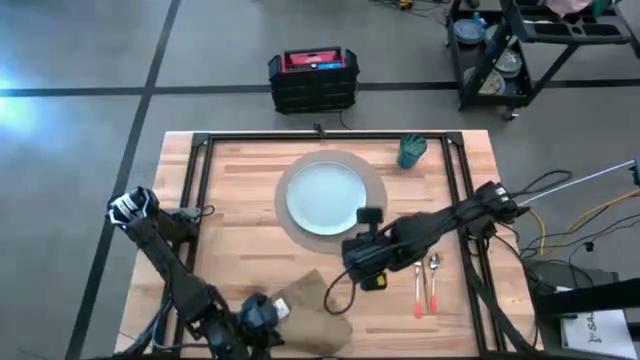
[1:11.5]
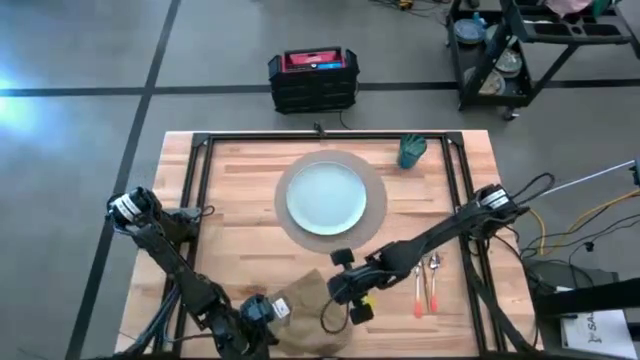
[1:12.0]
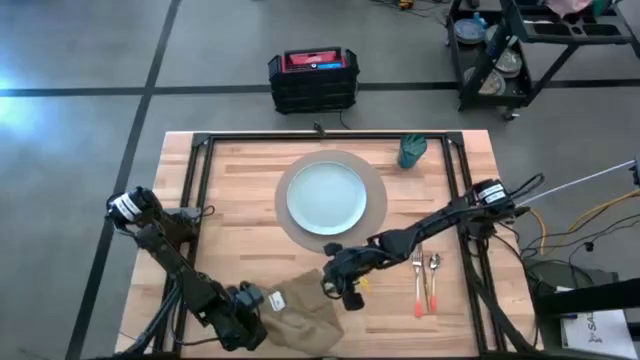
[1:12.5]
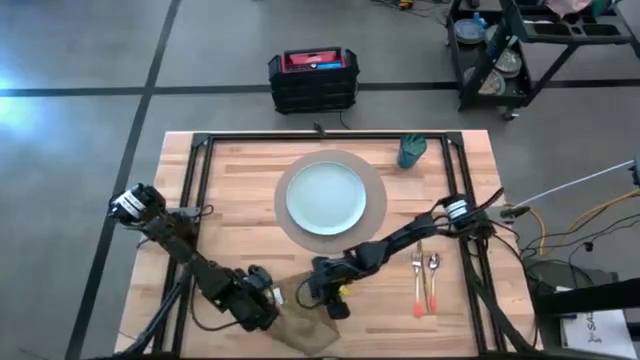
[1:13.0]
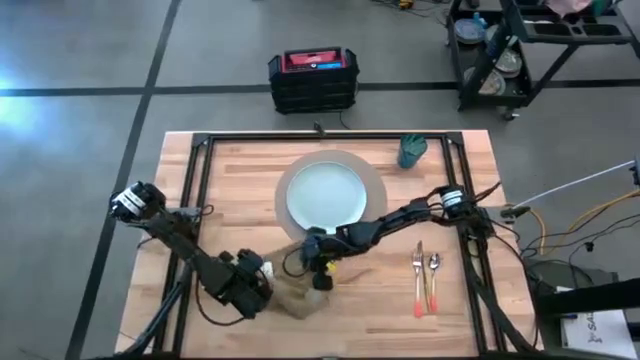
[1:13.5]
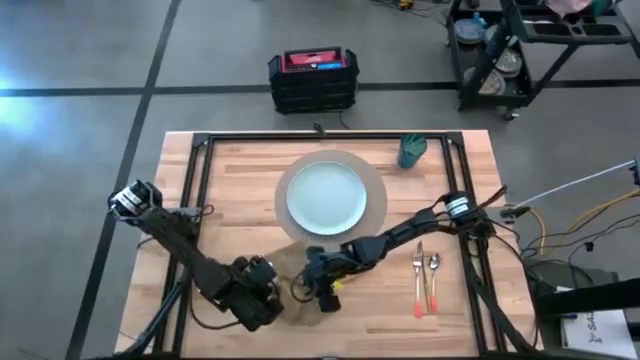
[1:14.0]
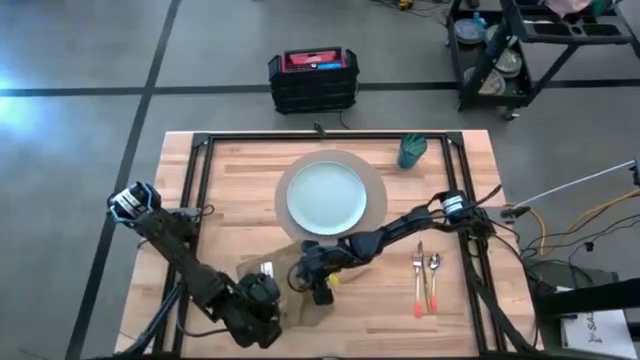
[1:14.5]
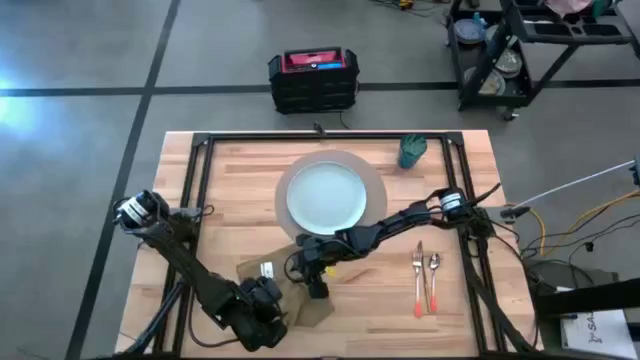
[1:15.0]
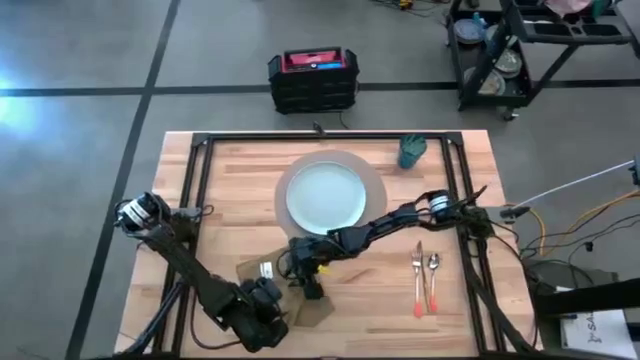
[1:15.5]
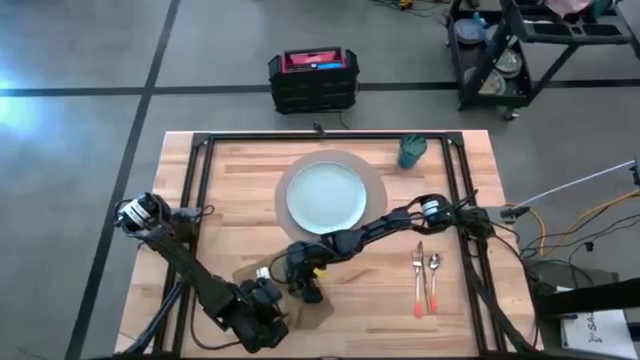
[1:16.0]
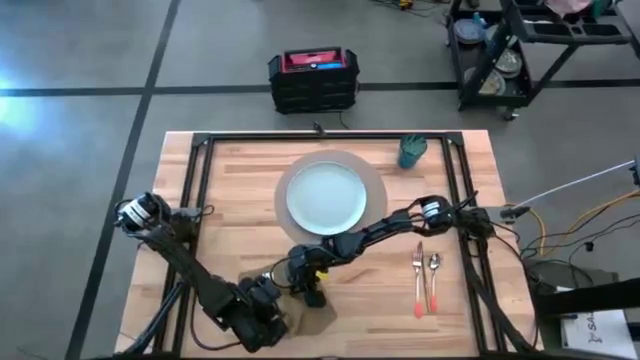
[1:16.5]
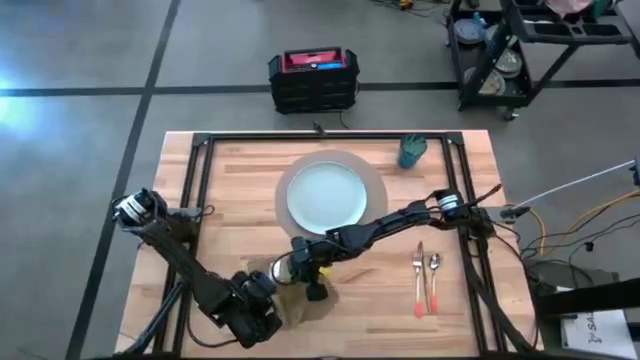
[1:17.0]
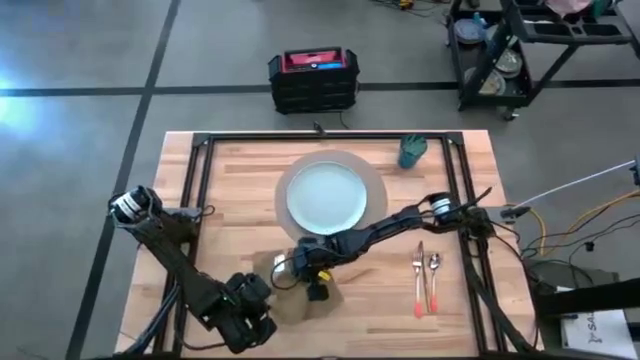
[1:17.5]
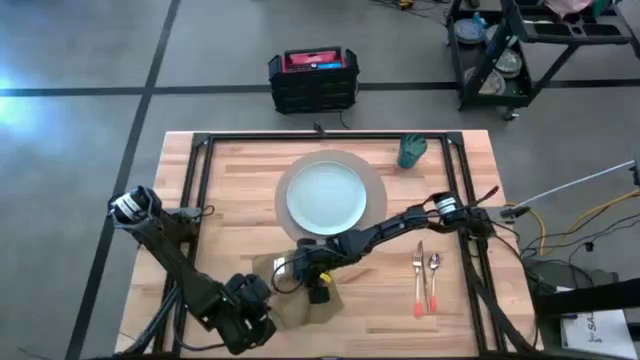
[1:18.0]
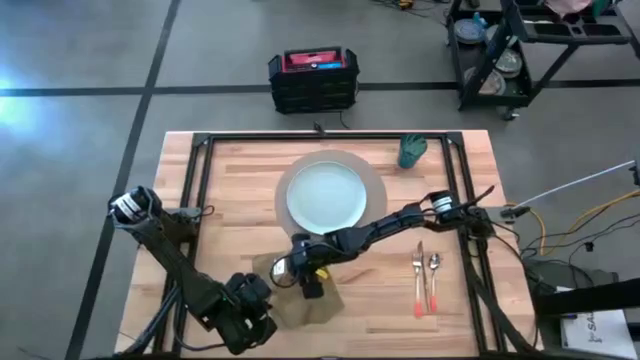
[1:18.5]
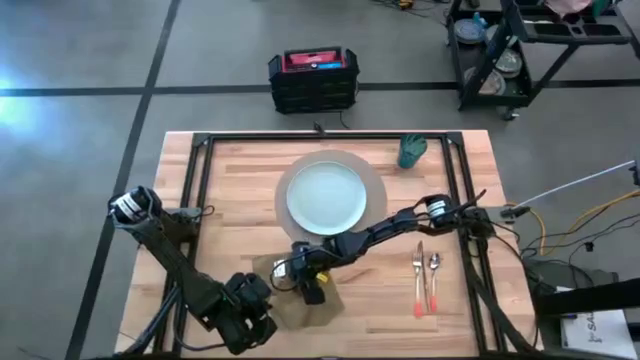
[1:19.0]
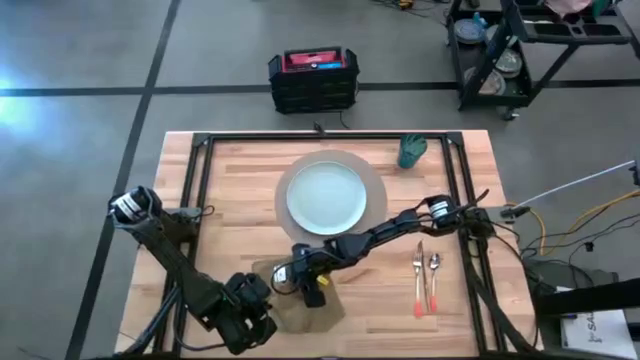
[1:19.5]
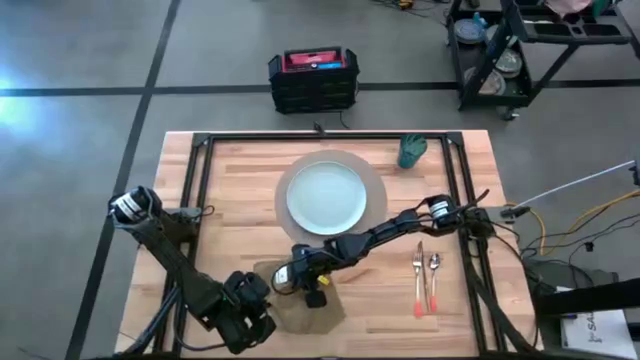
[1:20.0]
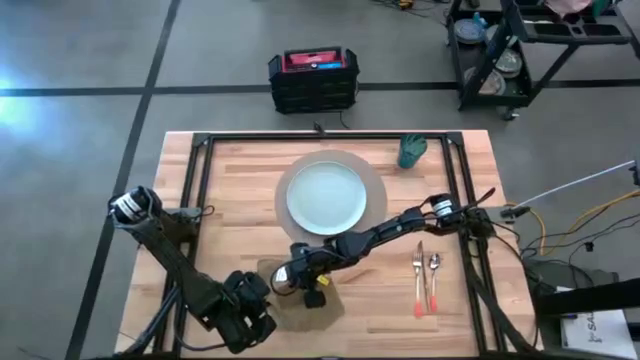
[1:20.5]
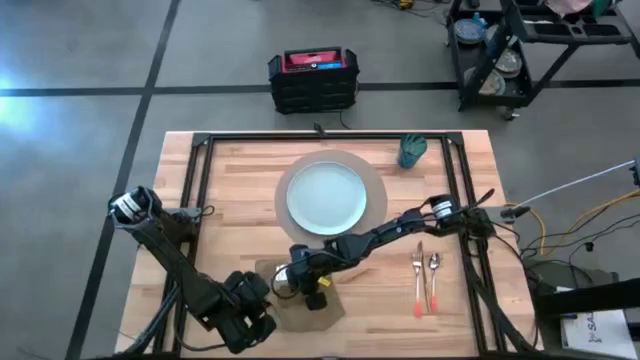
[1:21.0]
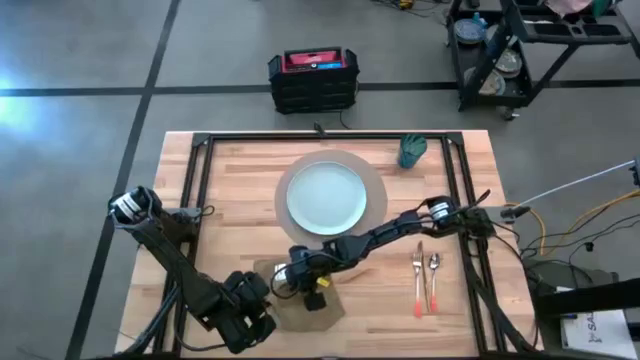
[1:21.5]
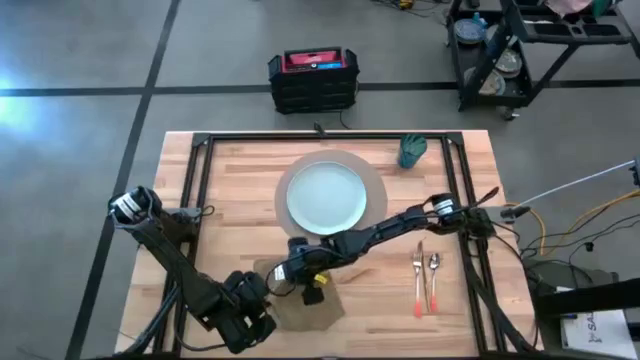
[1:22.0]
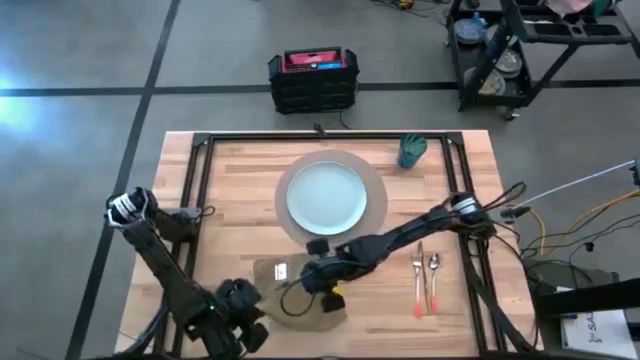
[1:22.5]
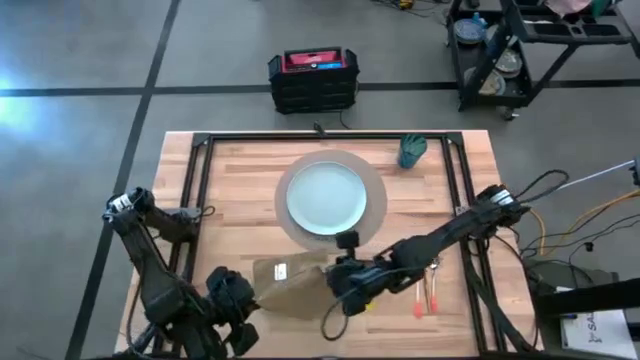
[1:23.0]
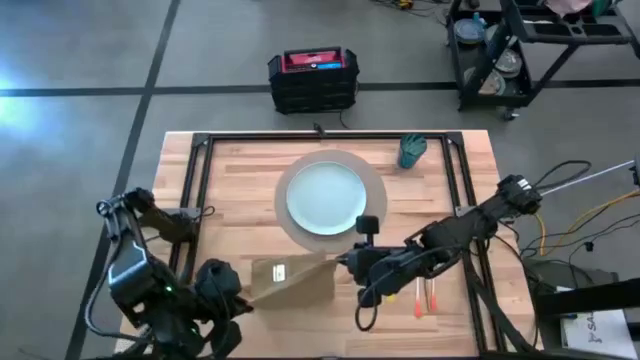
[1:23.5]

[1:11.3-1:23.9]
Task: Set table place
Fold the brown table napkin

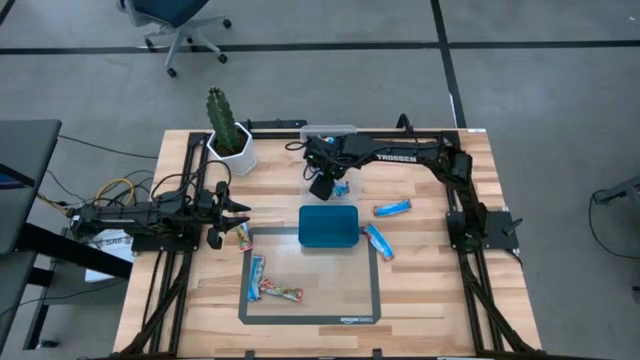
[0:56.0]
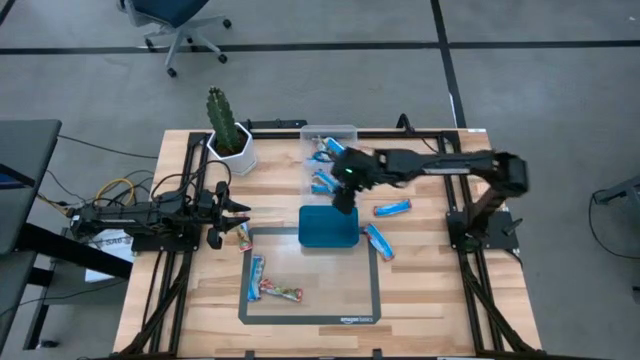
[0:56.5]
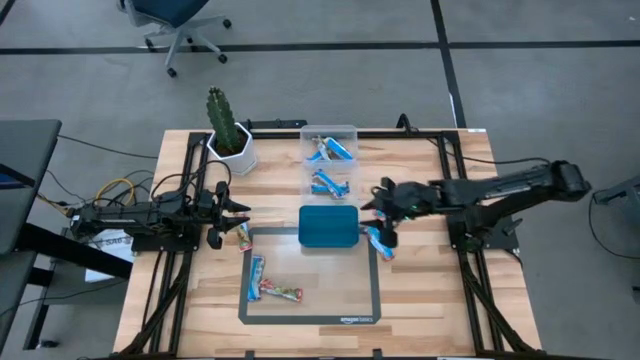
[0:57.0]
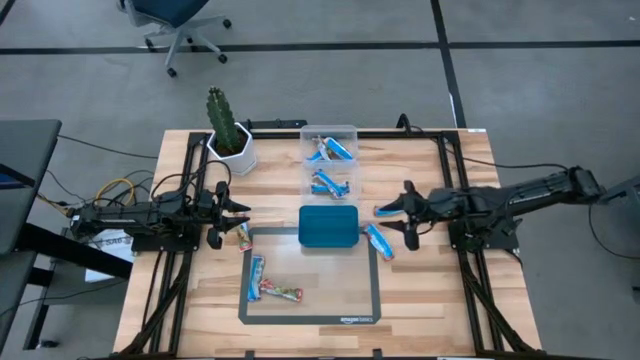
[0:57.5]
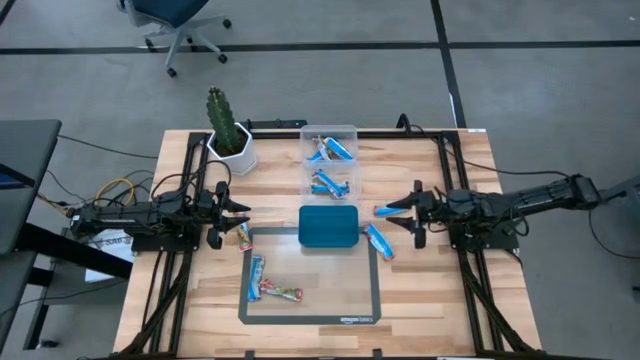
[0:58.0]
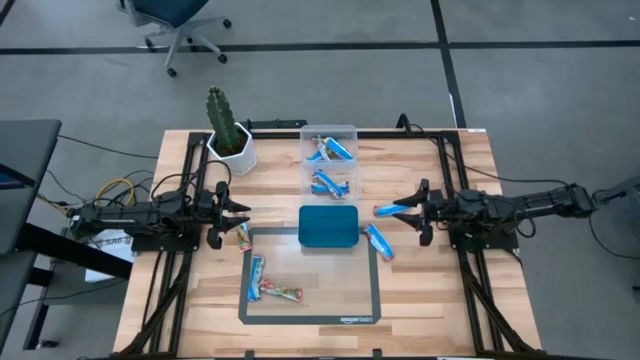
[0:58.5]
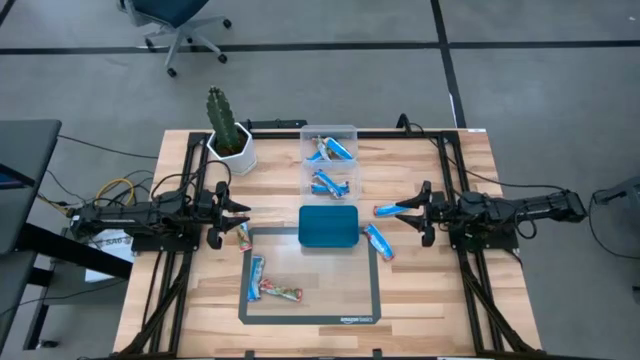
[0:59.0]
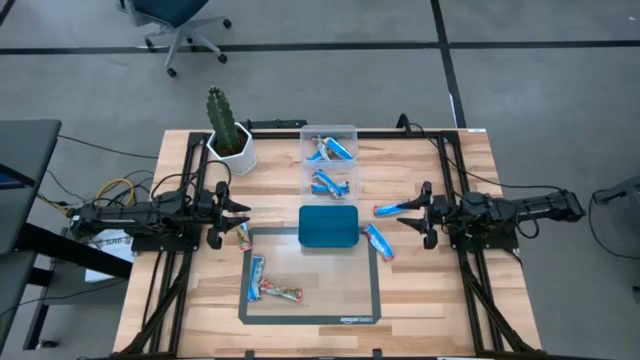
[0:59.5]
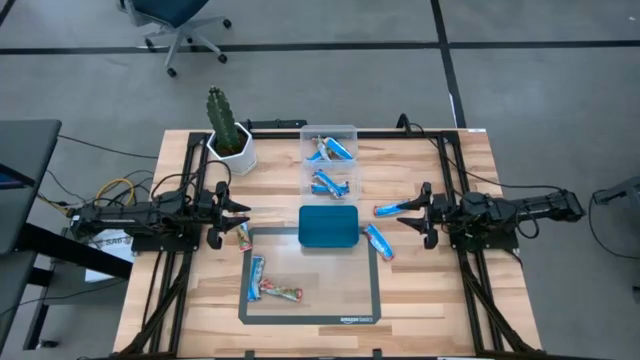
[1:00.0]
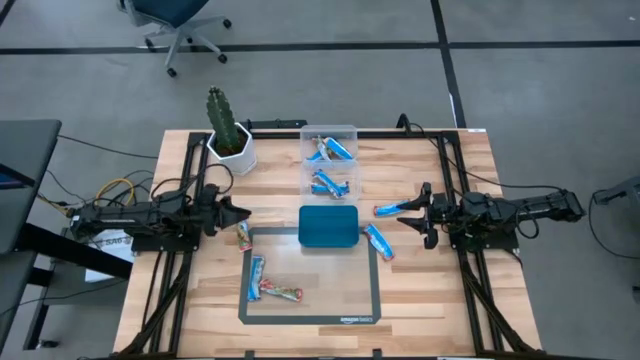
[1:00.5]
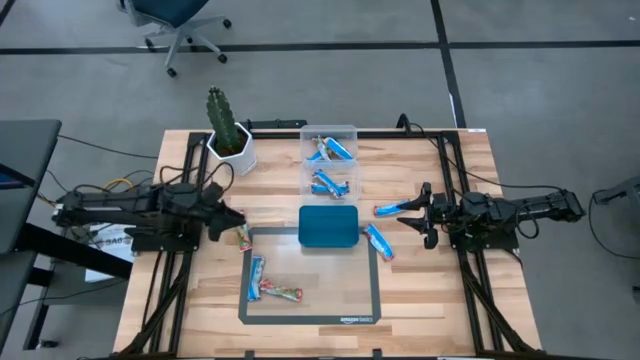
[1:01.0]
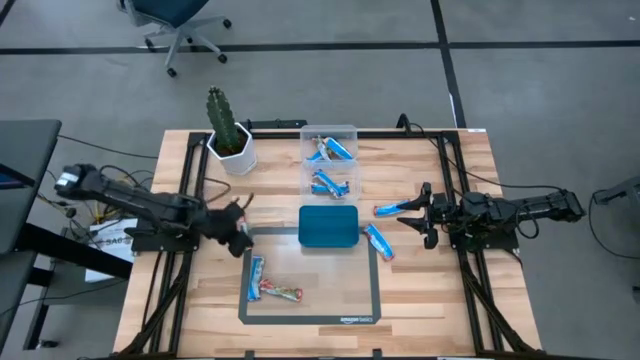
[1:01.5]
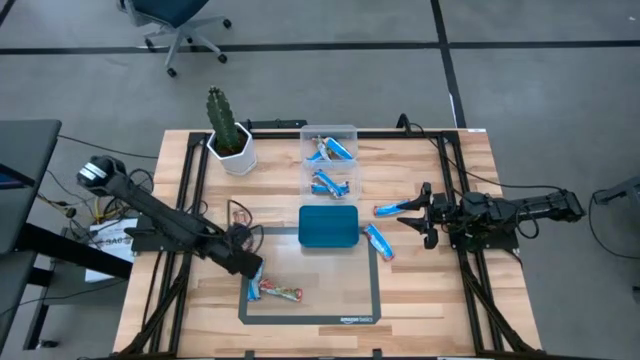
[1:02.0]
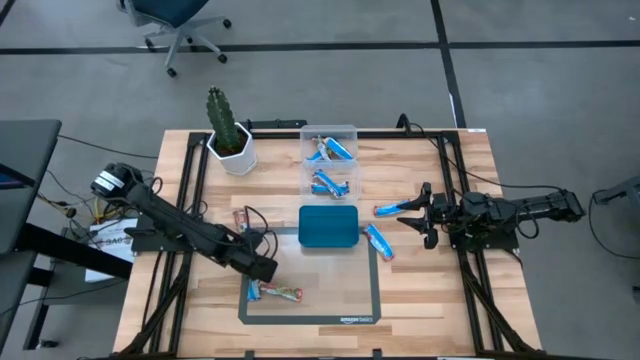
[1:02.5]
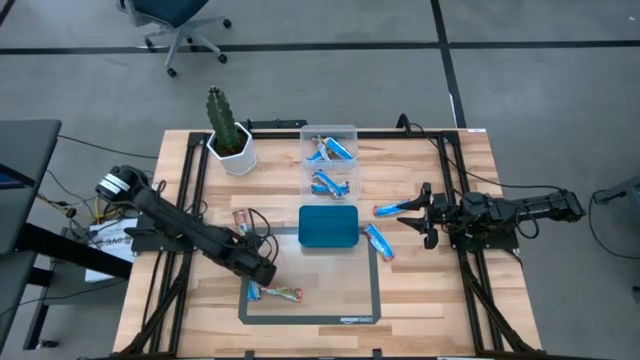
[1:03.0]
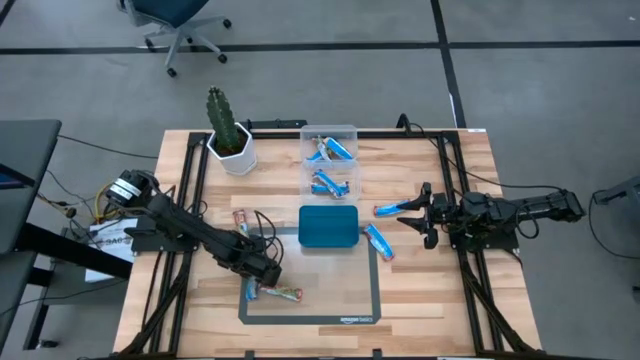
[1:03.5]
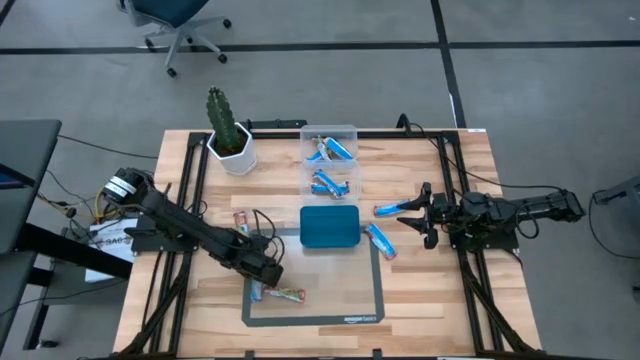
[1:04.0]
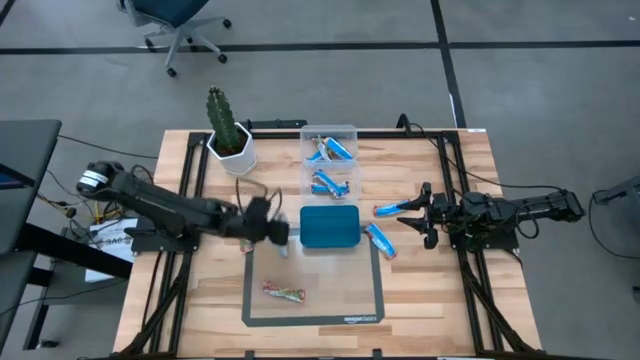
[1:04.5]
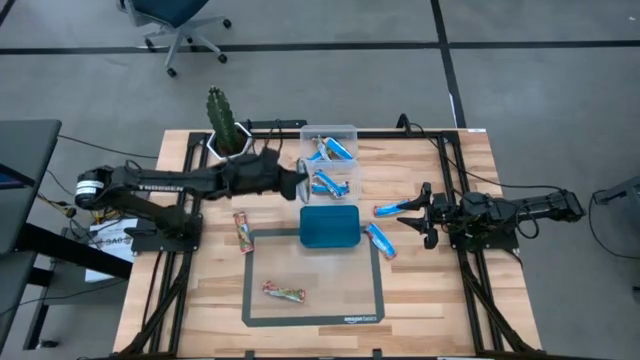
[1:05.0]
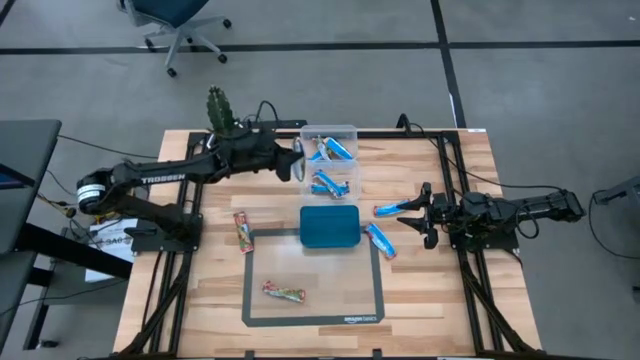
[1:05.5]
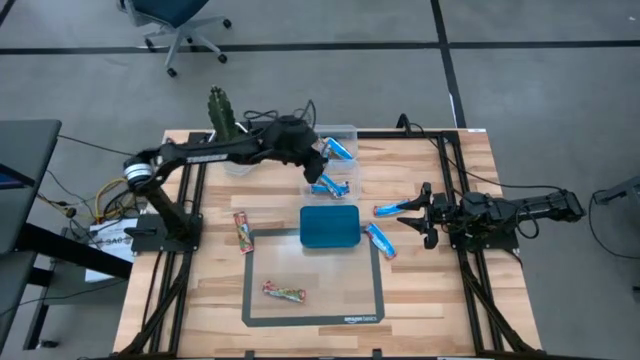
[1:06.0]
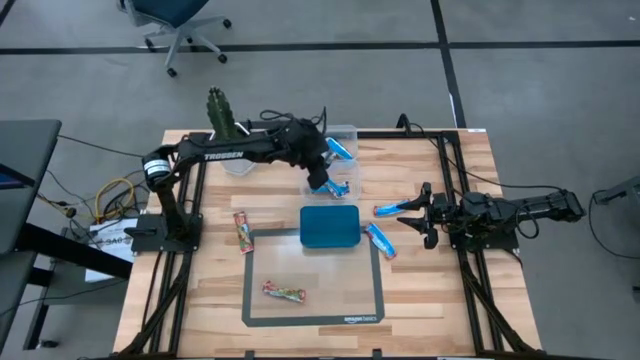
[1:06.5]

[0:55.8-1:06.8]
Task: Pick and place Granola Bars by type
Put the blue granola bar into the bottom transparent bin
